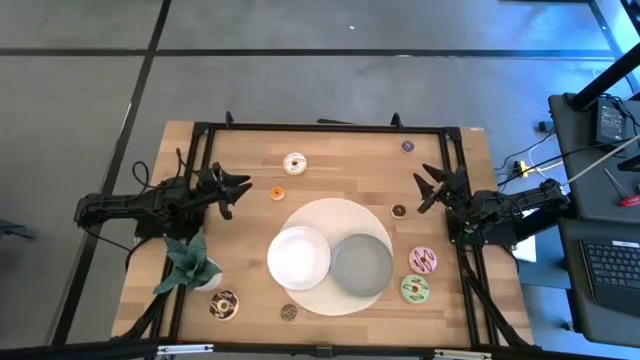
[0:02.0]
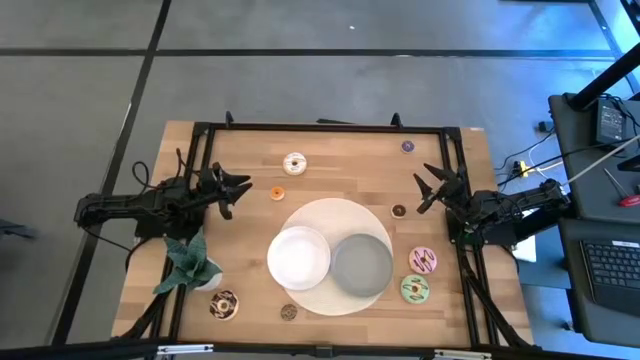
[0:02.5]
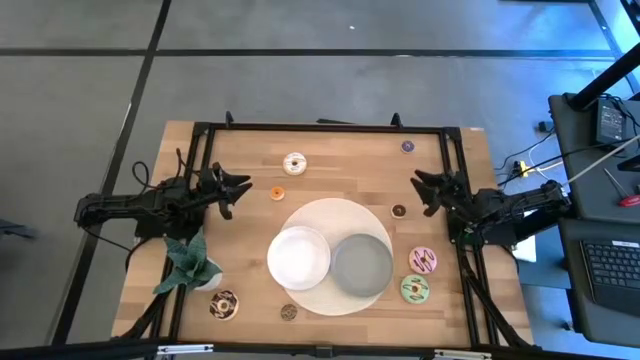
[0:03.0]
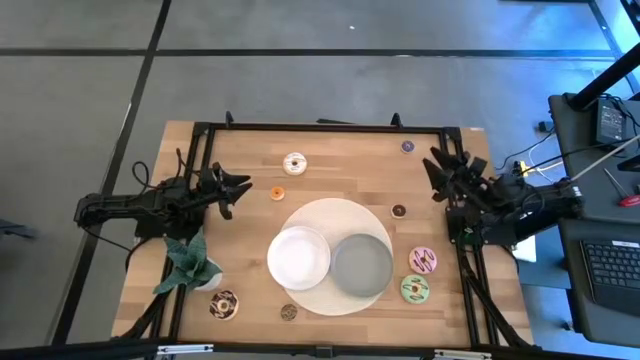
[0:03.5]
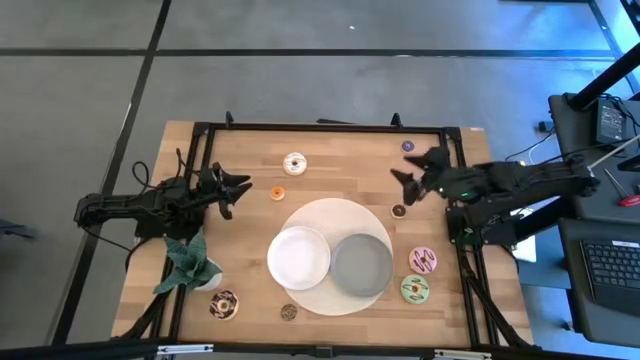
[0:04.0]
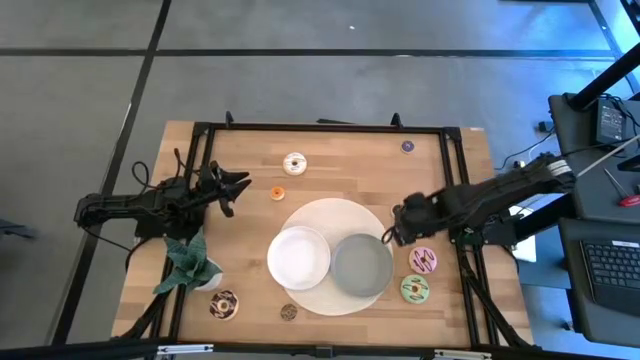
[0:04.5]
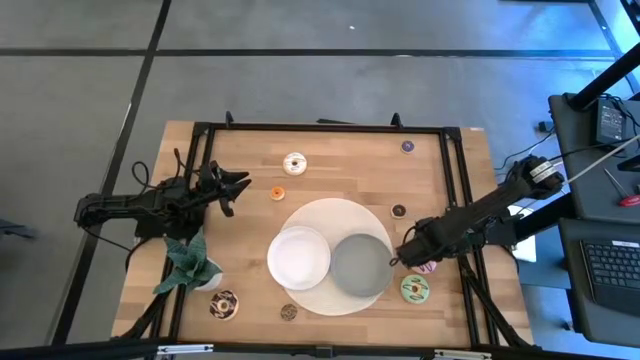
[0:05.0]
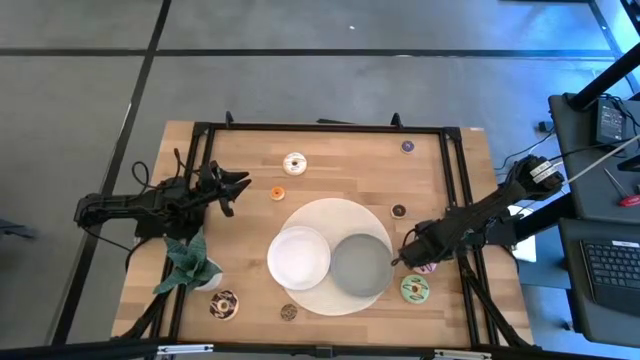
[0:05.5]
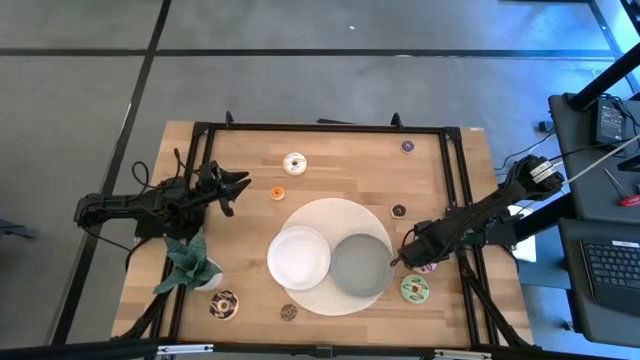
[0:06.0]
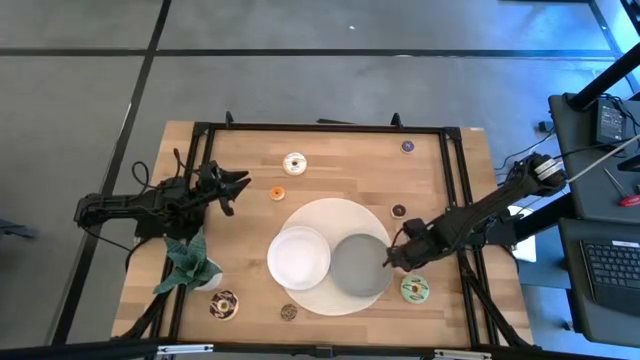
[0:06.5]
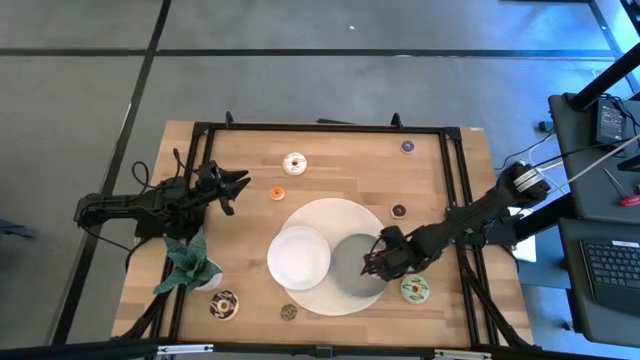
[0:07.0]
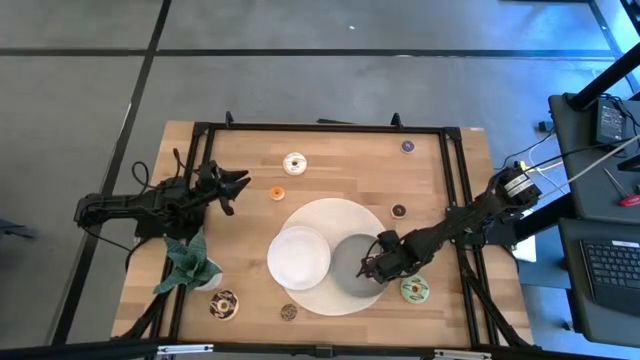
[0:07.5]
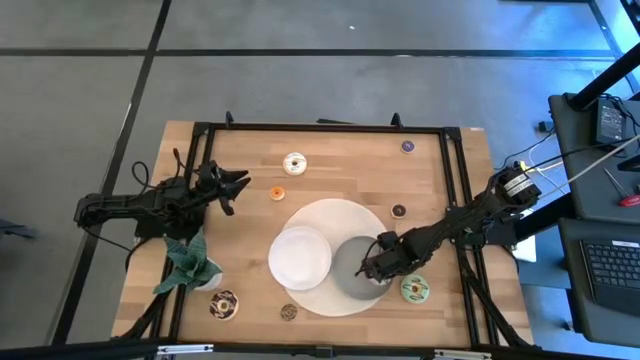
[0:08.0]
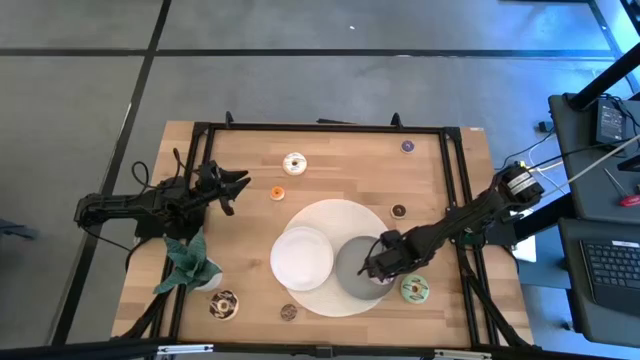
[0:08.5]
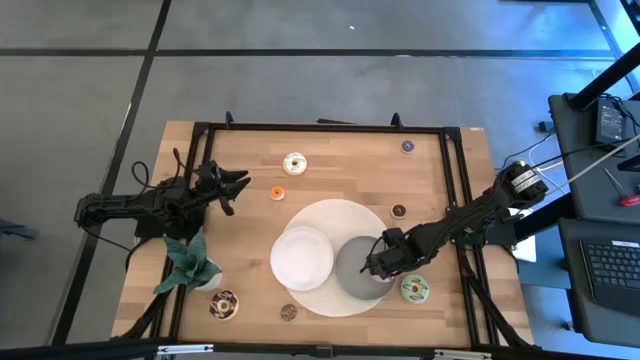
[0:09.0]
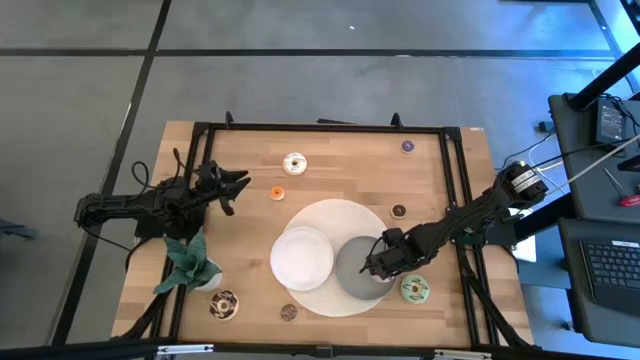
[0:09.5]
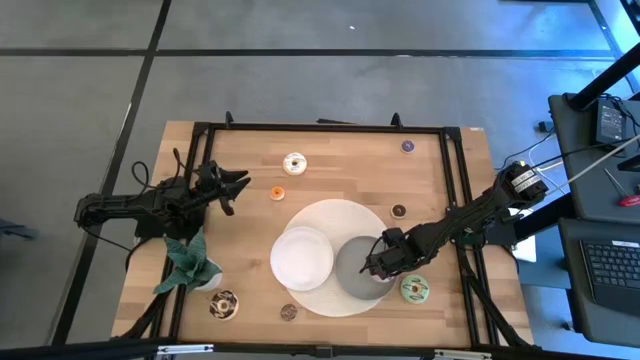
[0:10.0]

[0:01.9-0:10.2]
Task: Pick & Place donuts
Put the large purple donut on the gray plate

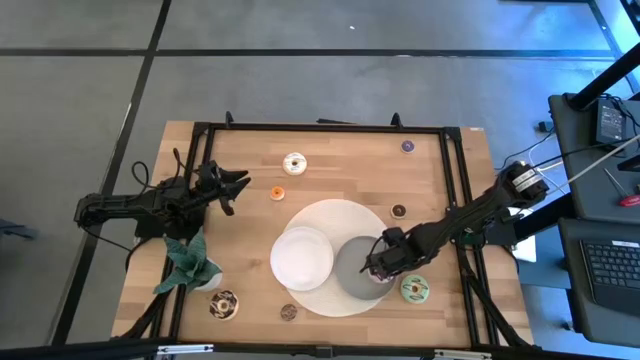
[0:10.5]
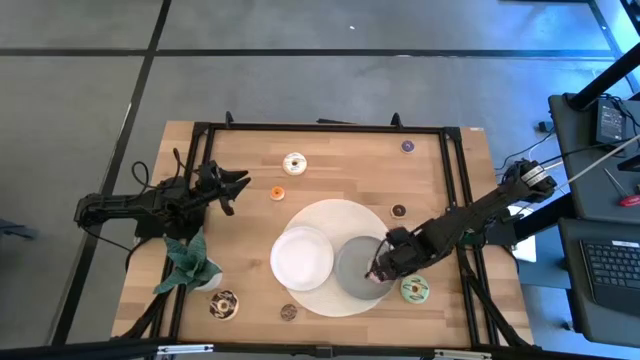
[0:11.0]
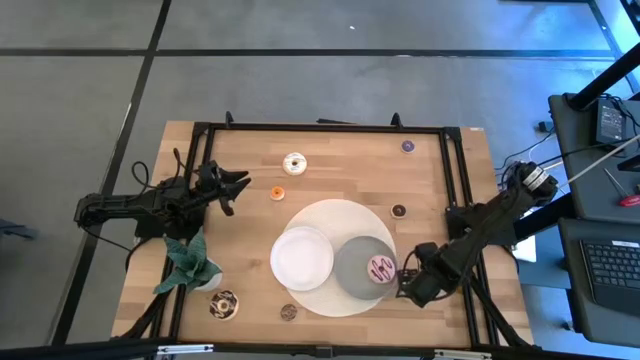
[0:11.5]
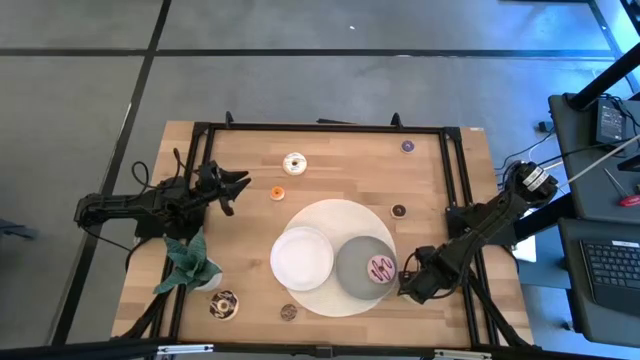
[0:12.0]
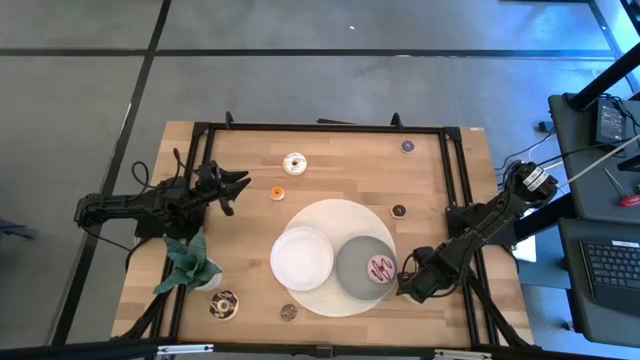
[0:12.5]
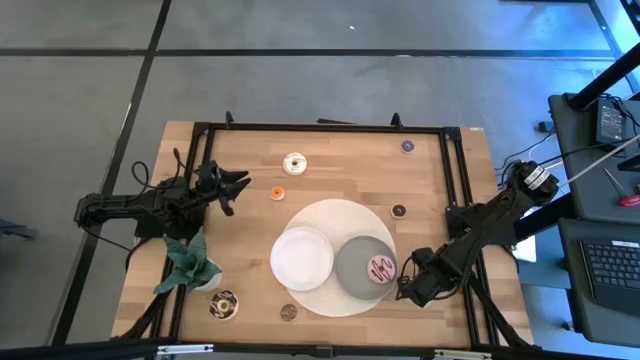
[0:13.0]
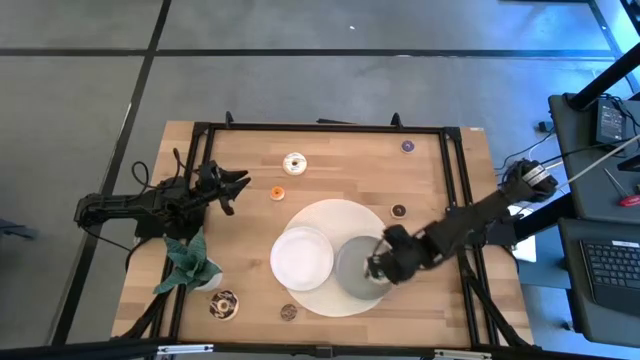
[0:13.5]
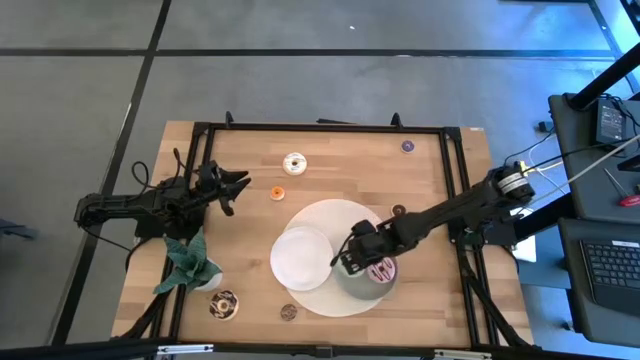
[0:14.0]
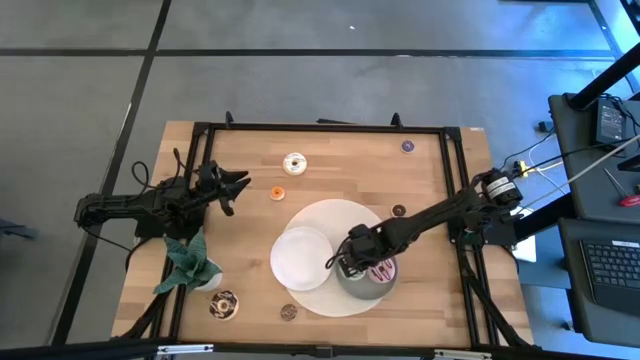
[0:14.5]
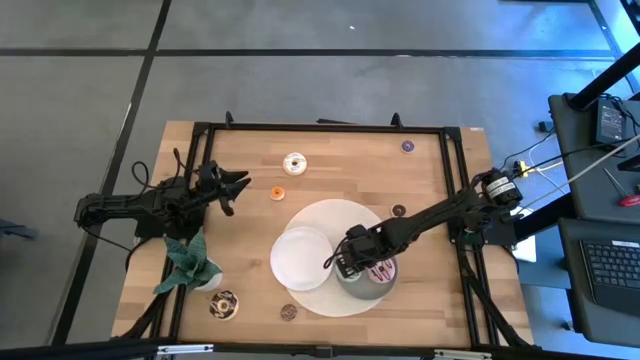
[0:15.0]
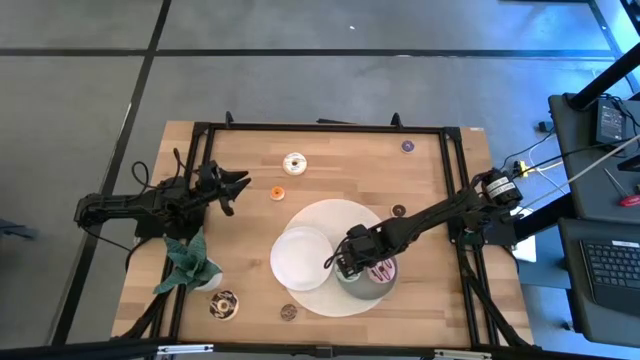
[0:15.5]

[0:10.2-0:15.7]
Put the large green donut on the gray plate

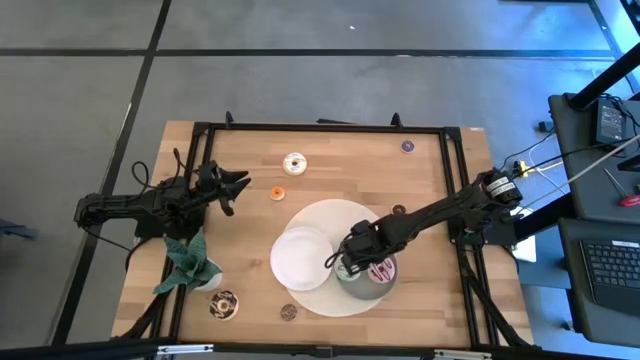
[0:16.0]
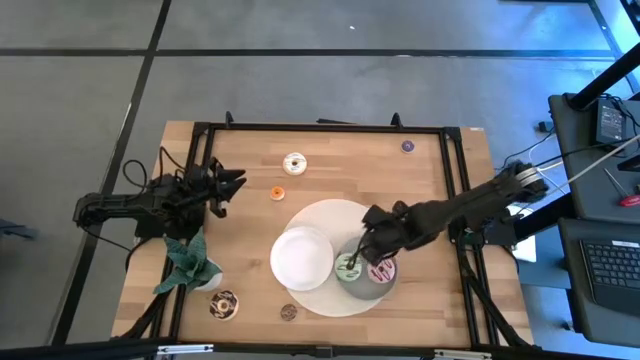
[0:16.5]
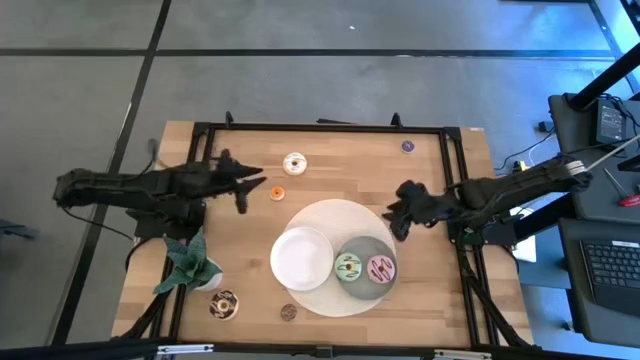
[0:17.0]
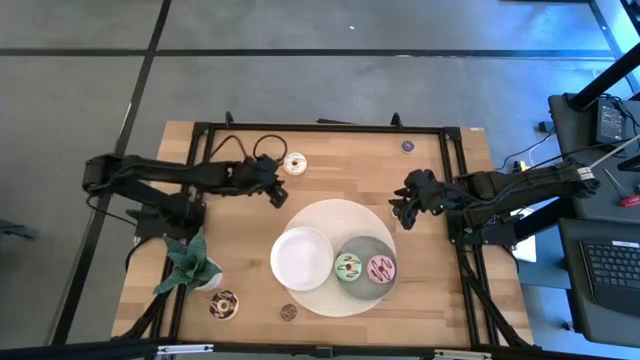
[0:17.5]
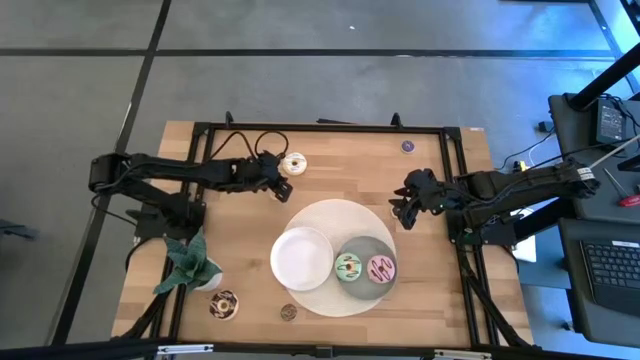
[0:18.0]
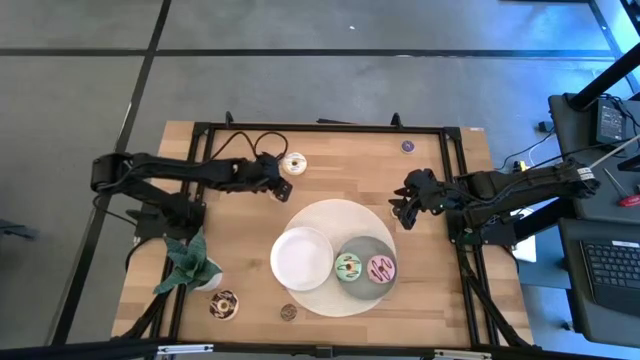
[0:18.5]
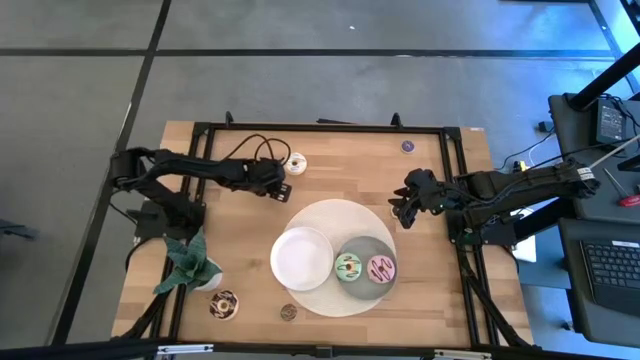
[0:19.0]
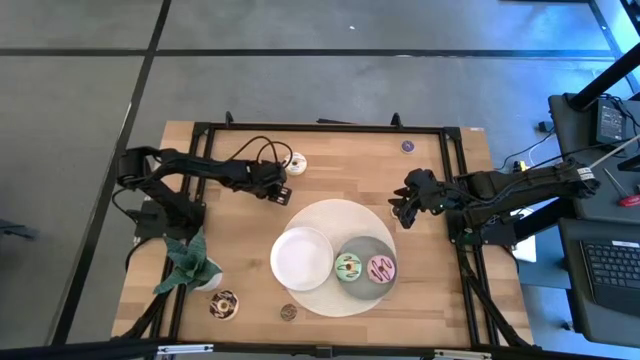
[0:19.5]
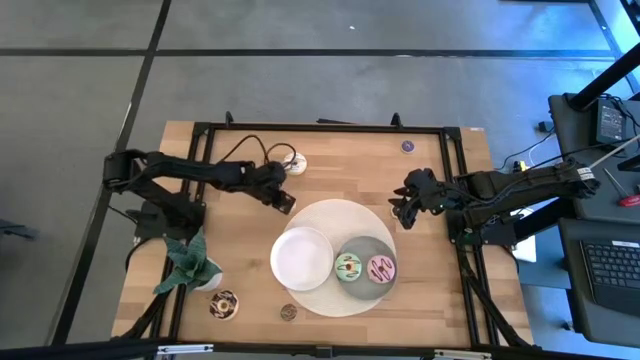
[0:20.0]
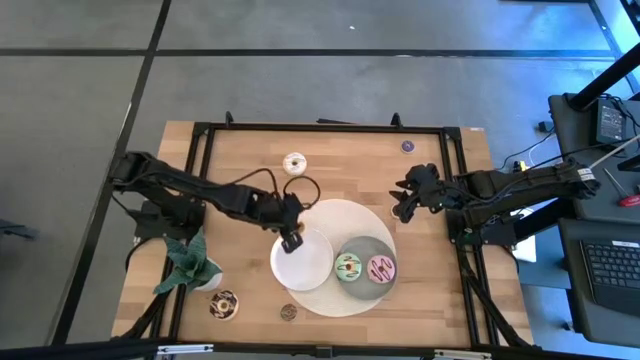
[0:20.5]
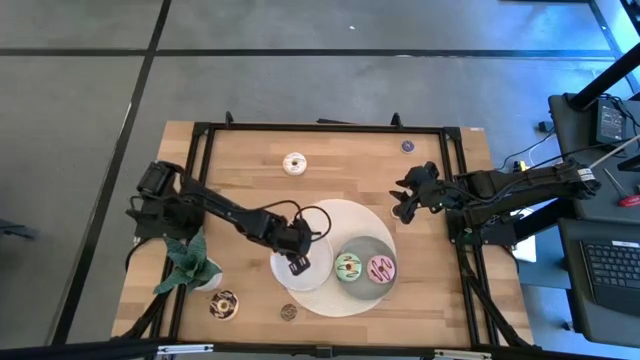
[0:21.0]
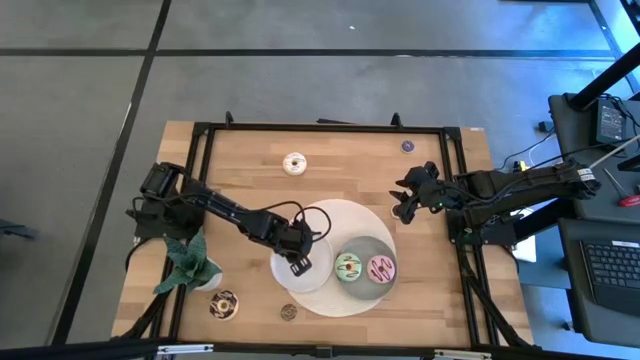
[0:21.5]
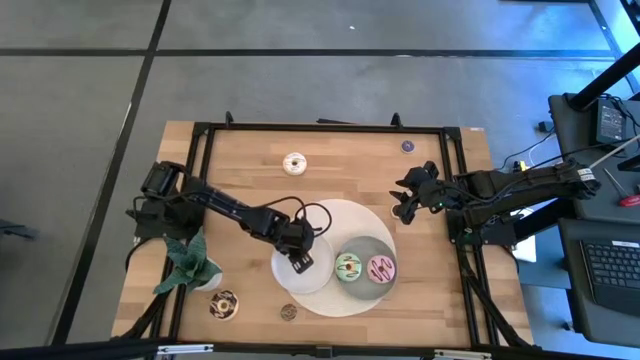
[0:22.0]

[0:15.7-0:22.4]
Put the small yellow donut on the white plate
